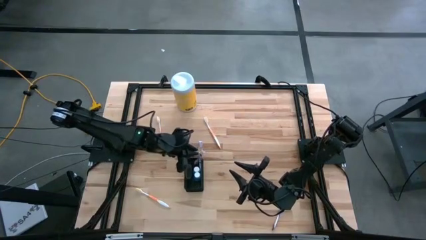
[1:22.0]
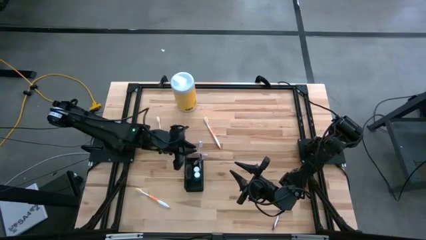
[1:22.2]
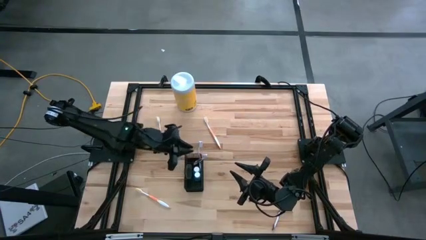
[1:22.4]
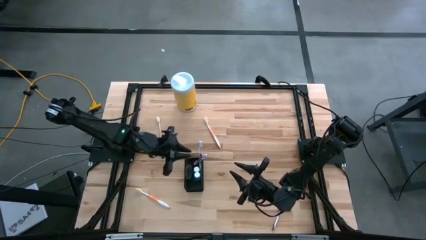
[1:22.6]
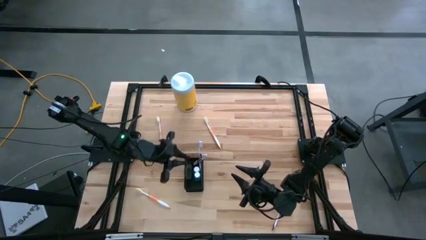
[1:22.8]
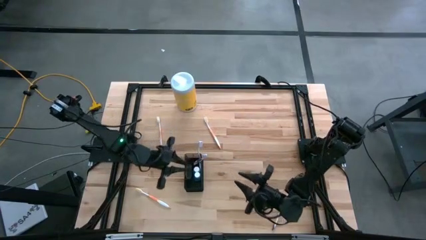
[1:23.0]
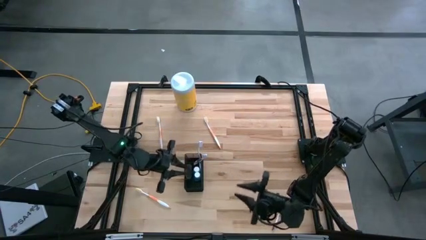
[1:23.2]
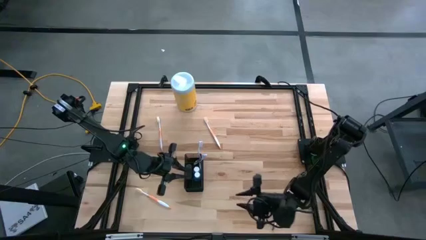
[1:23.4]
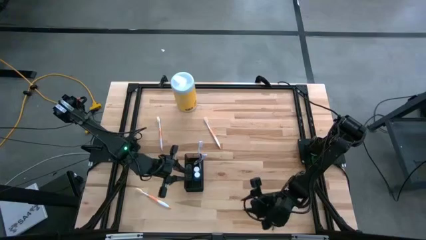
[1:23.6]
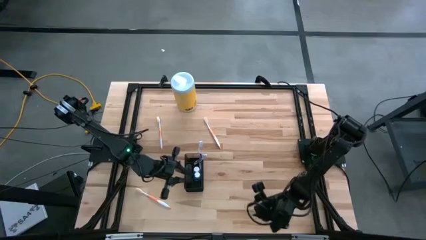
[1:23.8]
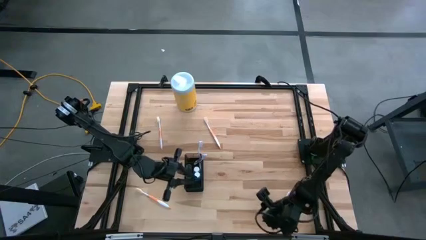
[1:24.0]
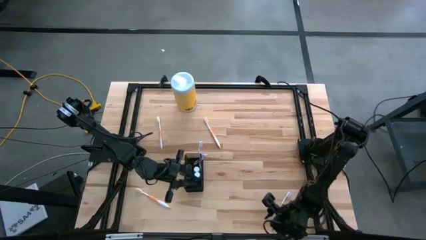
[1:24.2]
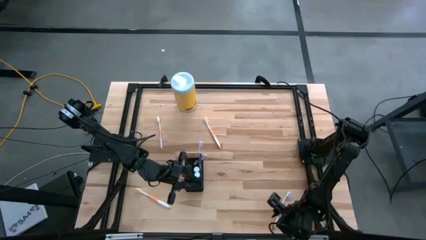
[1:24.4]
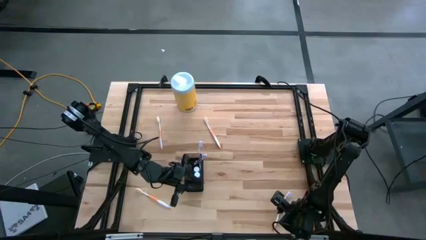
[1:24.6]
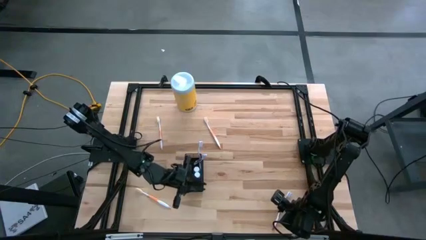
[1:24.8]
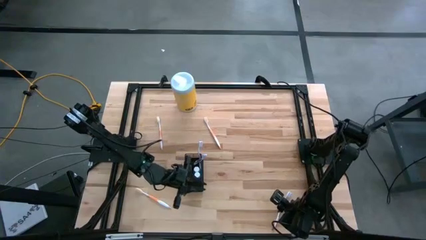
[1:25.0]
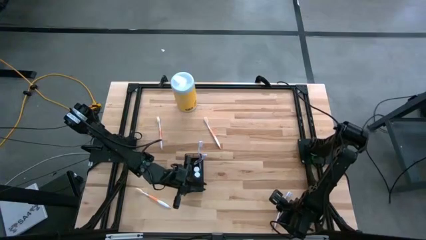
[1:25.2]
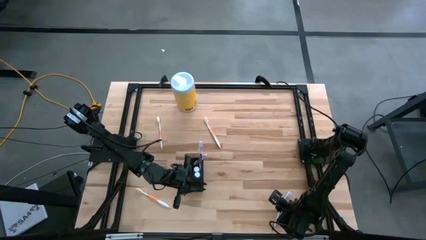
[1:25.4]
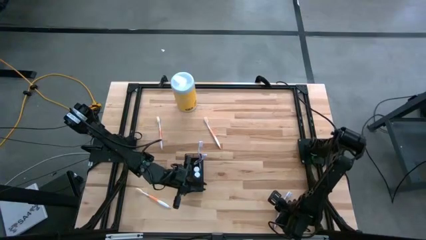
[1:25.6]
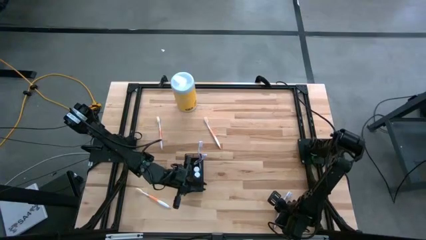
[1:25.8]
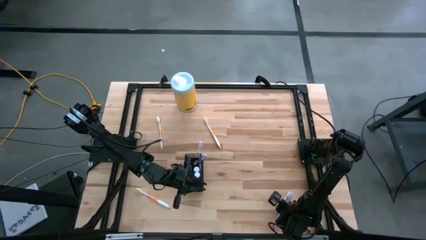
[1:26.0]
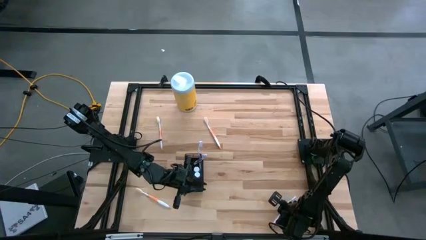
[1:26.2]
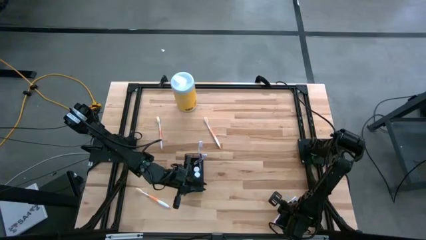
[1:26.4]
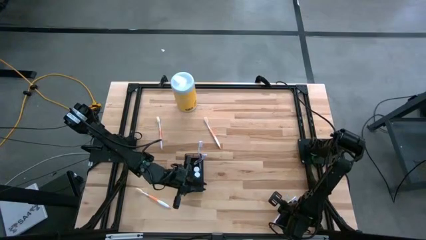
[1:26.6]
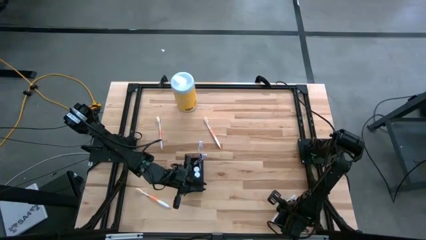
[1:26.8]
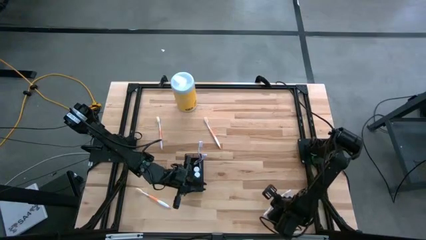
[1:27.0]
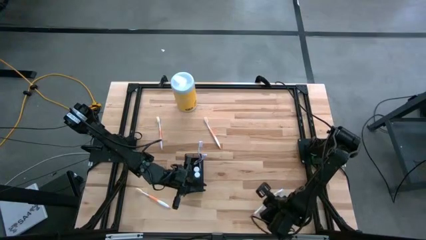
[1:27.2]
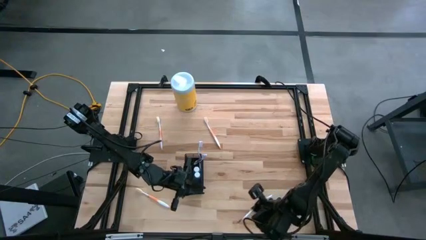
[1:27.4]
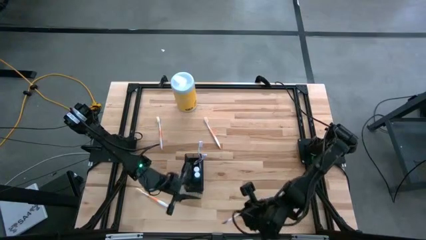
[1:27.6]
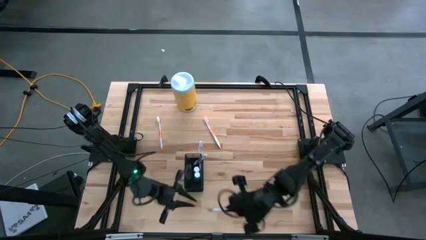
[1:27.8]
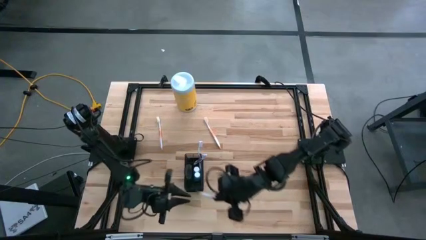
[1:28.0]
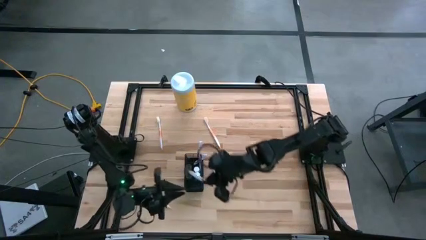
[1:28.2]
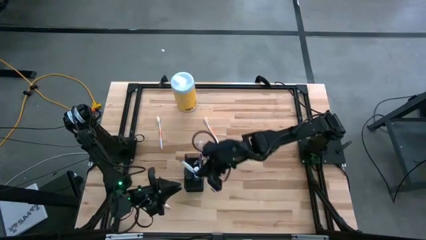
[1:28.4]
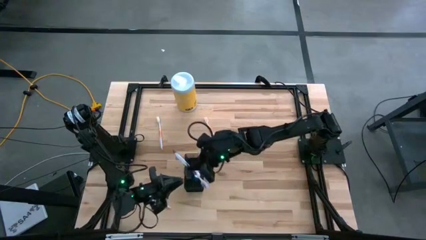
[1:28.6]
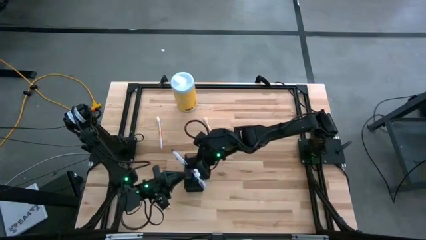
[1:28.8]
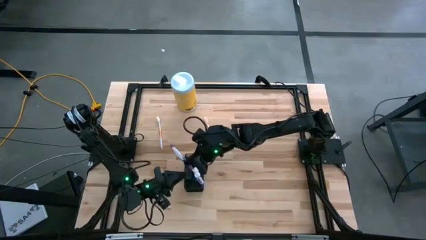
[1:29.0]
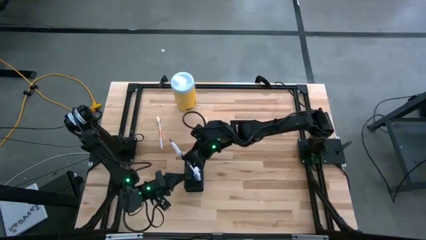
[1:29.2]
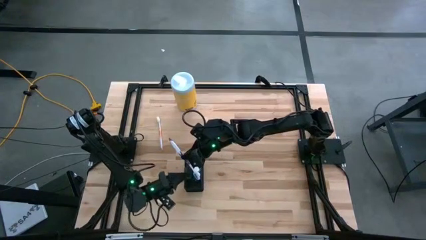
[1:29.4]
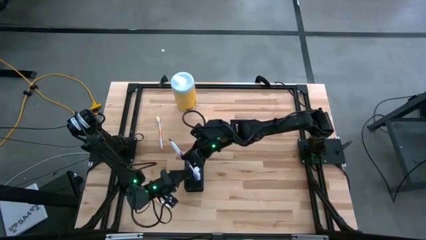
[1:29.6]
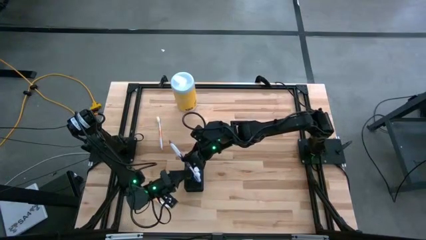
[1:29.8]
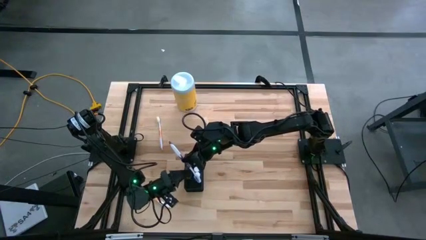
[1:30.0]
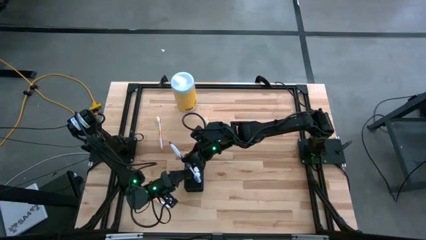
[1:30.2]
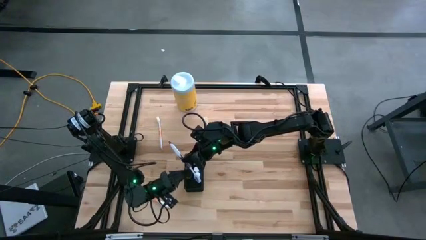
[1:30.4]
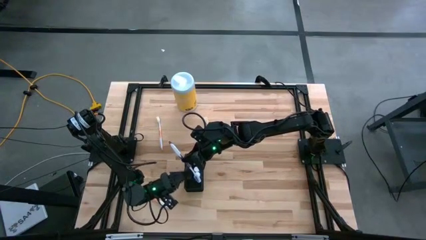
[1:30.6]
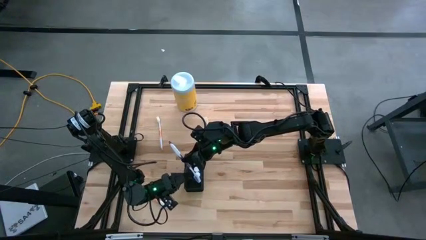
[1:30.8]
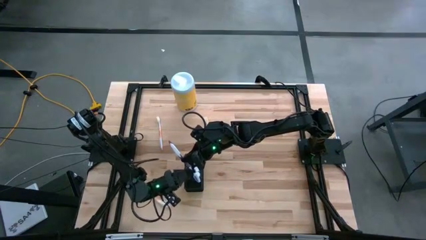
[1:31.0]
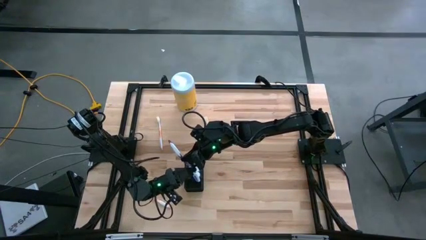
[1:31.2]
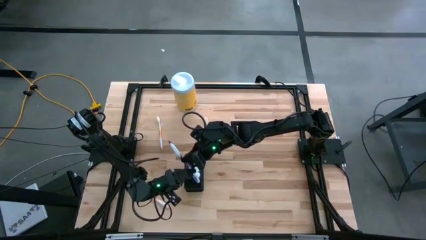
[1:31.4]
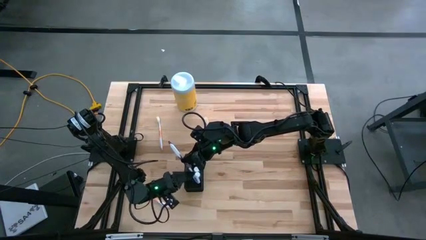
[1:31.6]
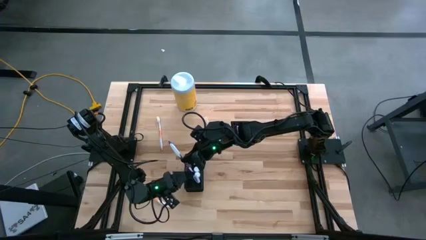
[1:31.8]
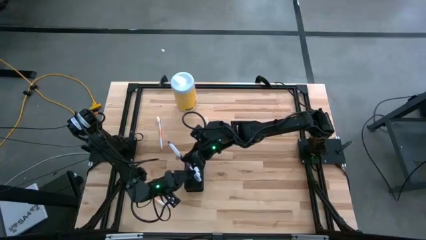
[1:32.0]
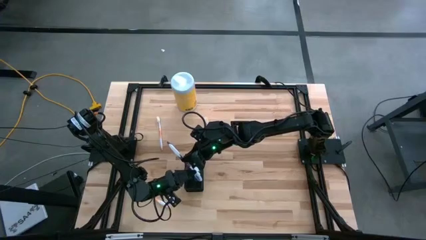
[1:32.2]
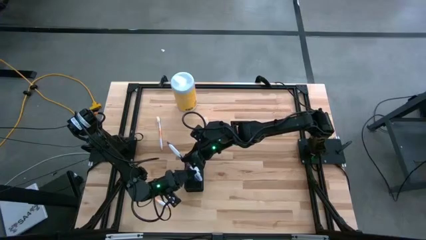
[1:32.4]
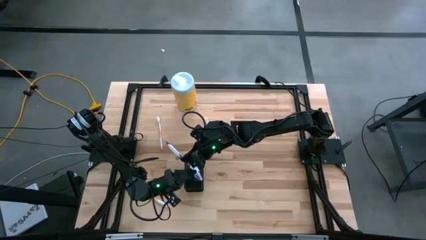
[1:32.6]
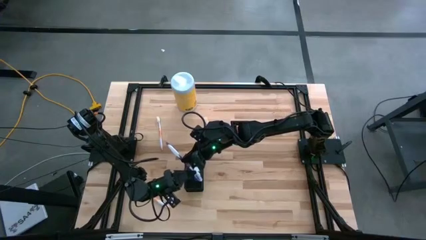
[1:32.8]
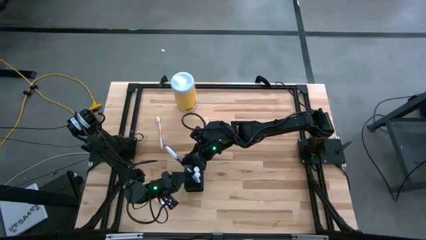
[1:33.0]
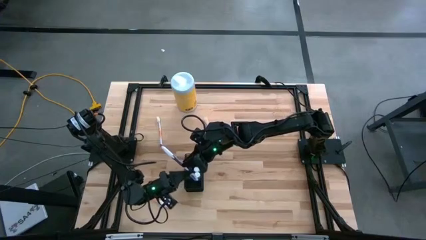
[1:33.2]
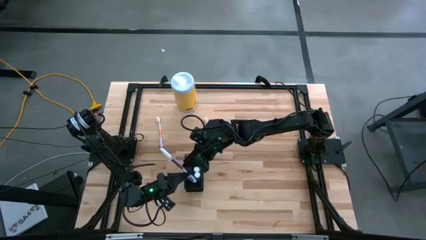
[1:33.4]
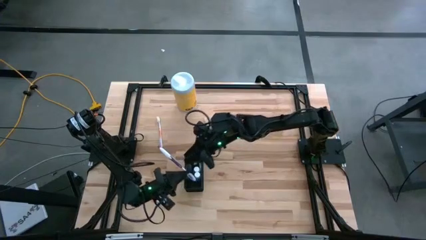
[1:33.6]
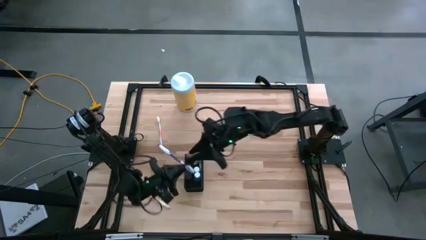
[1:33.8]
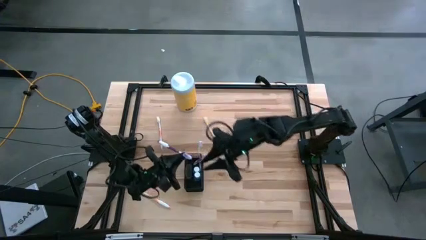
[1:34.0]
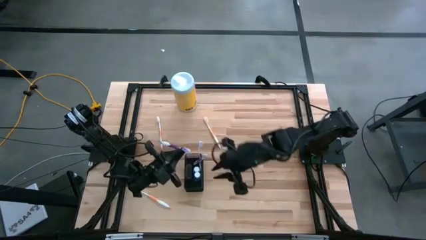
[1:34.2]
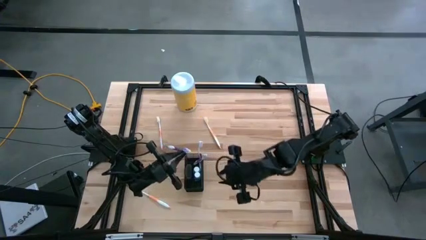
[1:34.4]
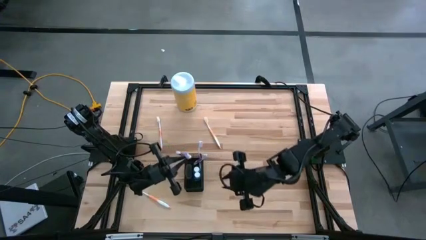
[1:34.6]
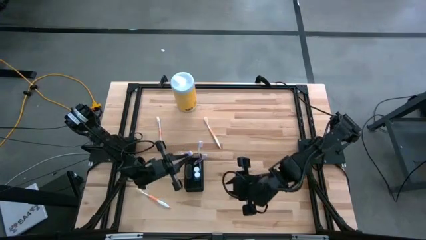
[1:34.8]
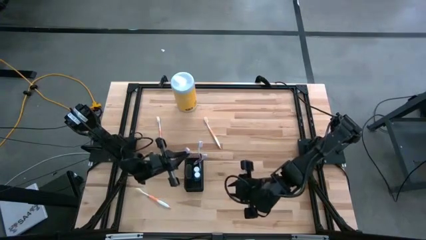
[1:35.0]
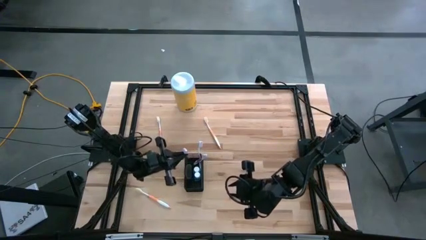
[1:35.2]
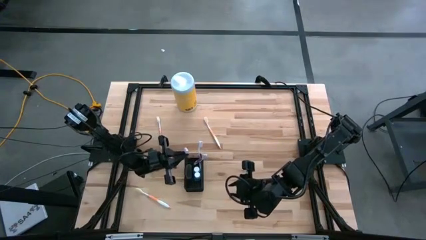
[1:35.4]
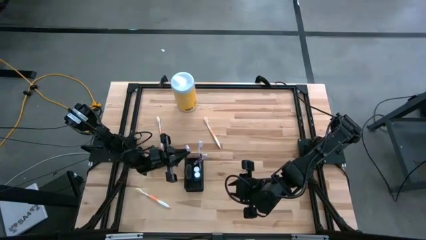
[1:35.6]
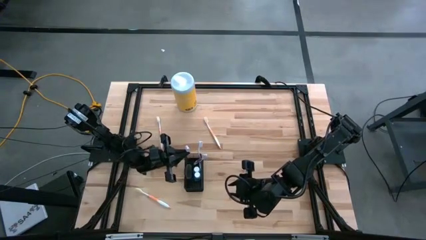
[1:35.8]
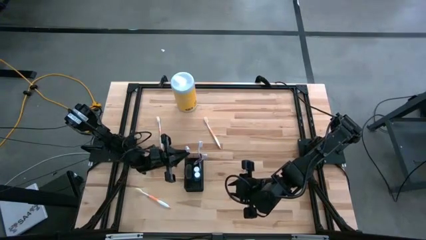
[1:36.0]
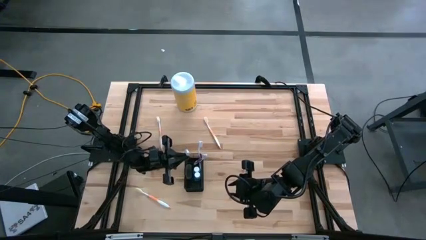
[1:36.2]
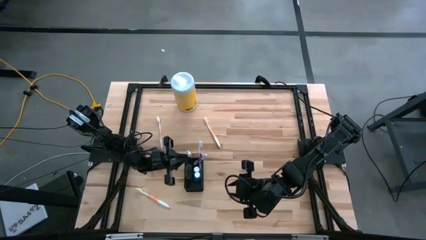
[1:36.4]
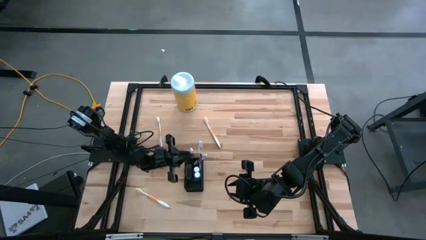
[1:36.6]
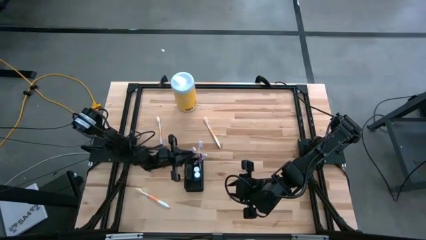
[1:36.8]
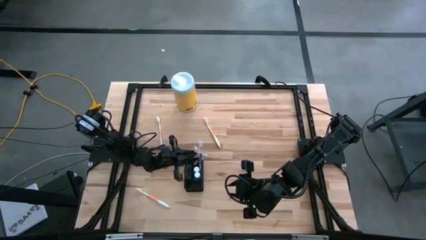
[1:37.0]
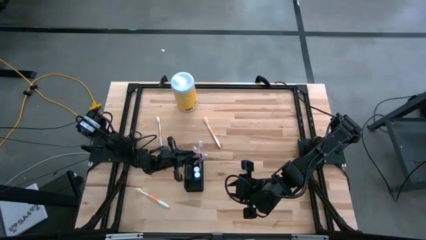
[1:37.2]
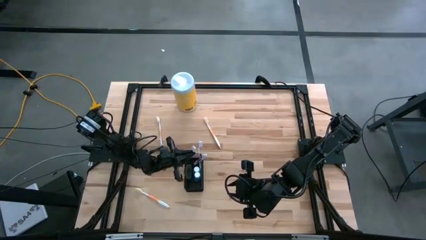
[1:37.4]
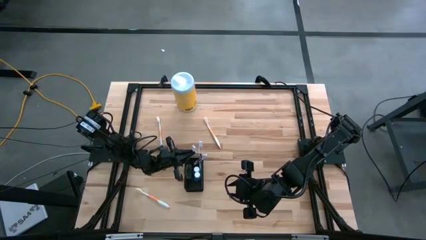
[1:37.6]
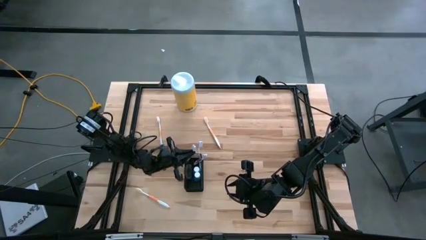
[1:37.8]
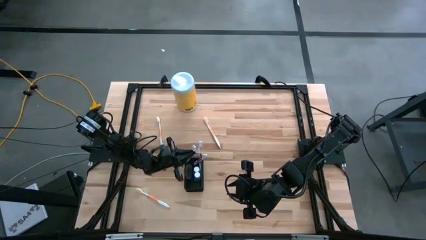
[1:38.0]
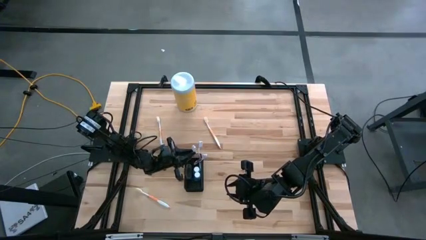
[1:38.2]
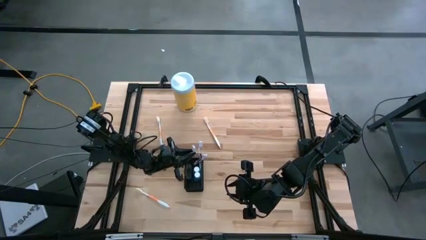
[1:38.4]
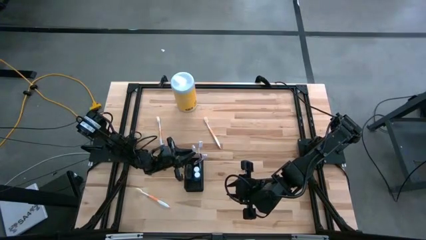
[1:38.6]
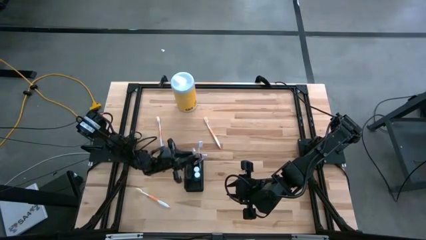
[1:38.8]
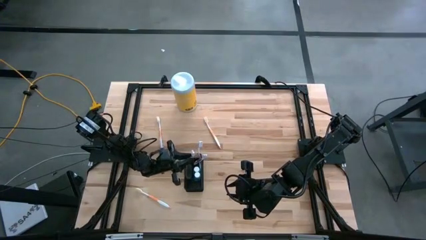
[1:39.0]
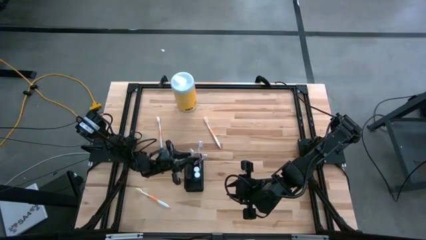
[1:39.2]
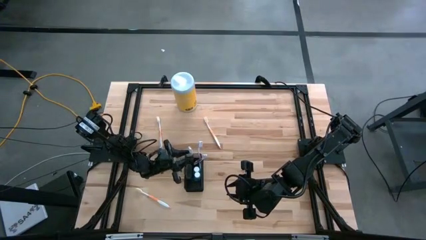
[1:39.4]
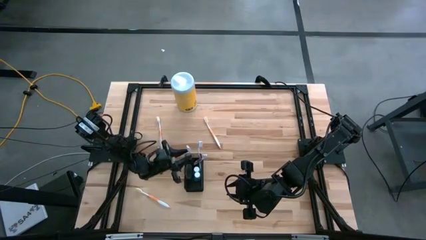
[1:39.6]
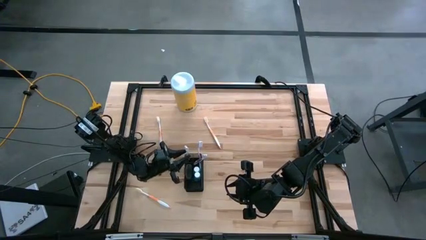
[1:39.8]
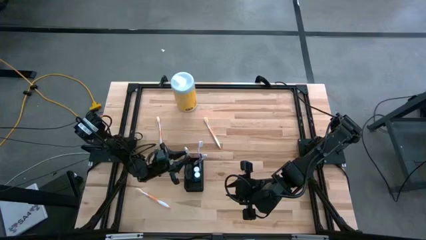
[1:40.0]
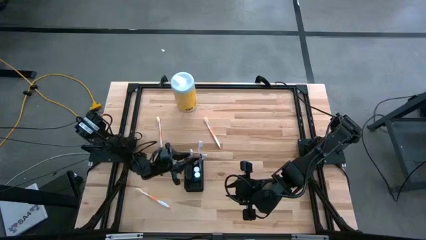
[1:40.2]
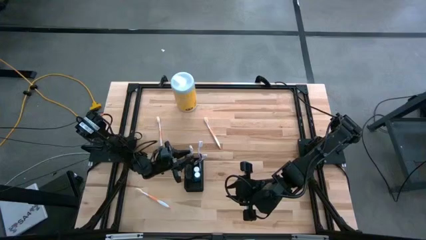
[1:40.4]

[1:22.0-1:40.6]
Task: Pick & Place toothbrushing station
Put the purple toothbrush into the top section of the black wire organizer
